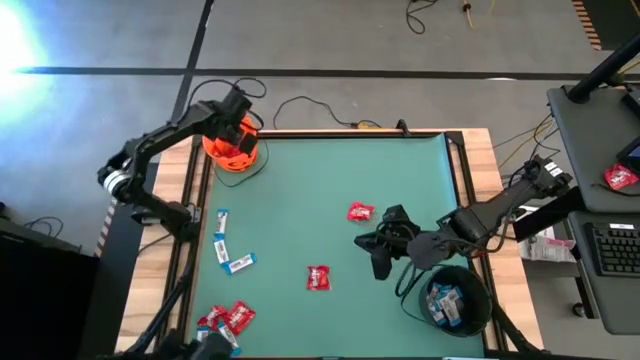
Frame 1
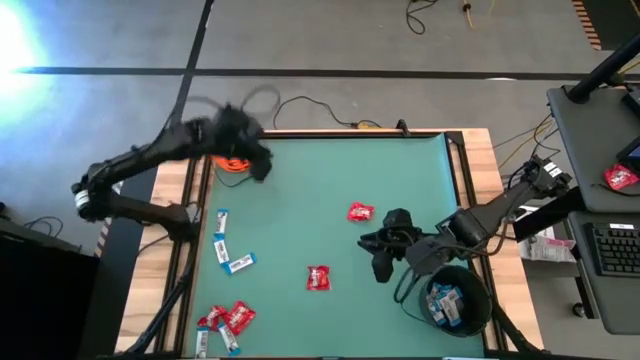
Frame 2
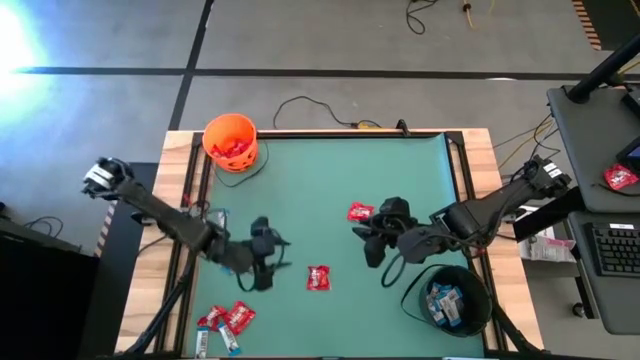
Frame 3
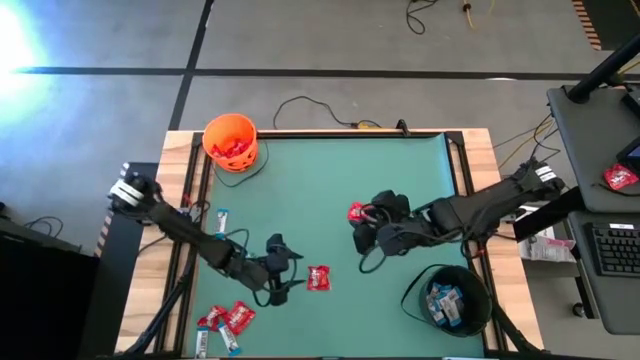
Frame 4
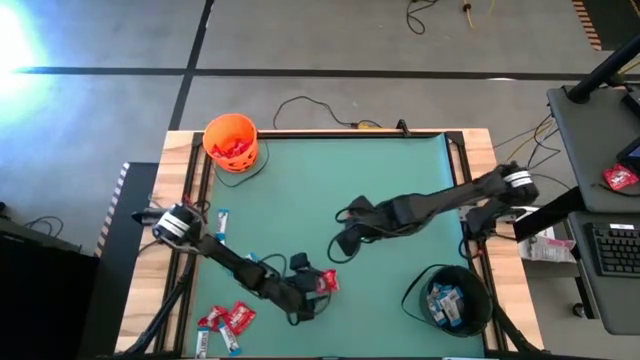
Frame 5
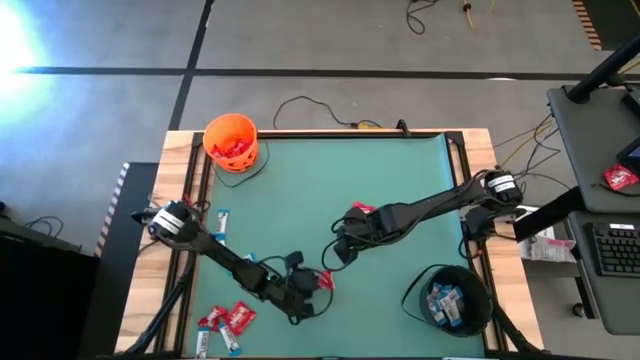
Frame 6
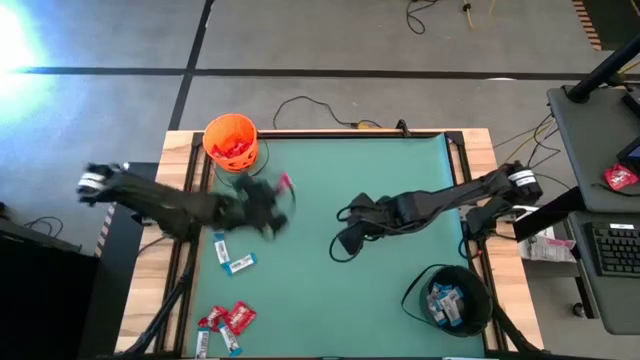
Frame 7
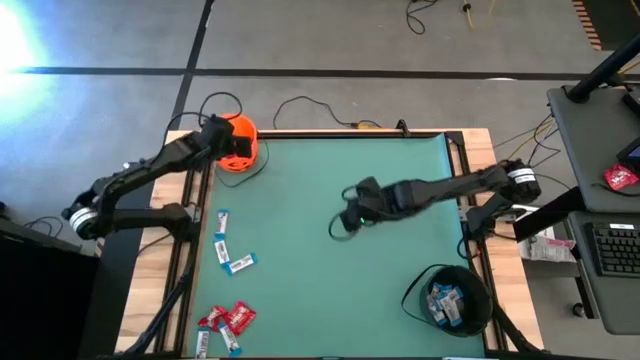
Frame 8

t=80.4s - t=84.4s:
Task: Sort candy by brand, put in halloween buckets
Put the red candy into the orange bucket

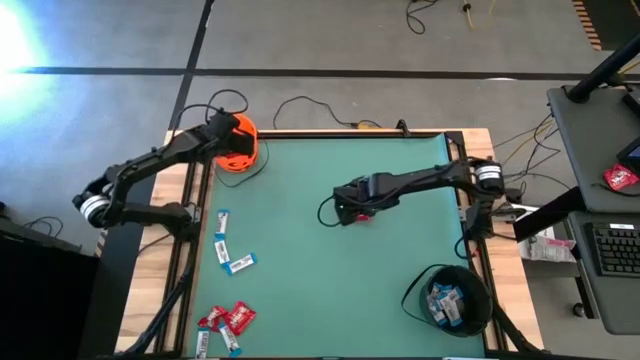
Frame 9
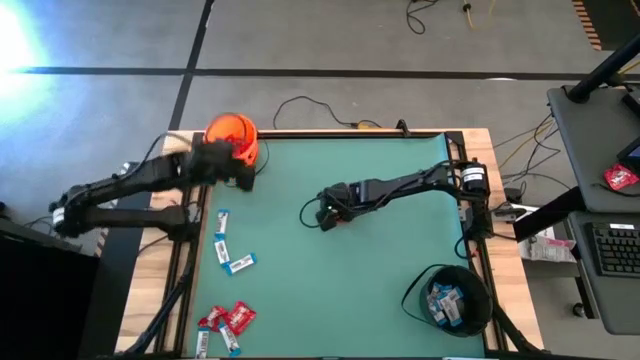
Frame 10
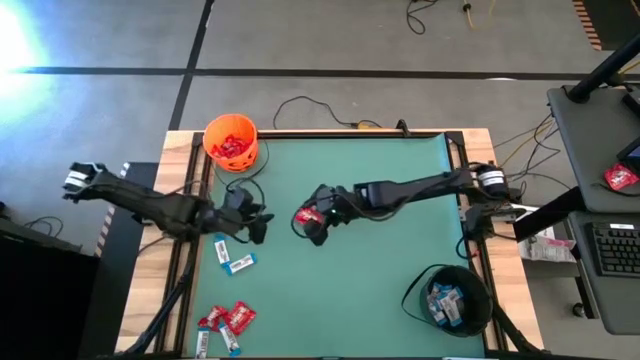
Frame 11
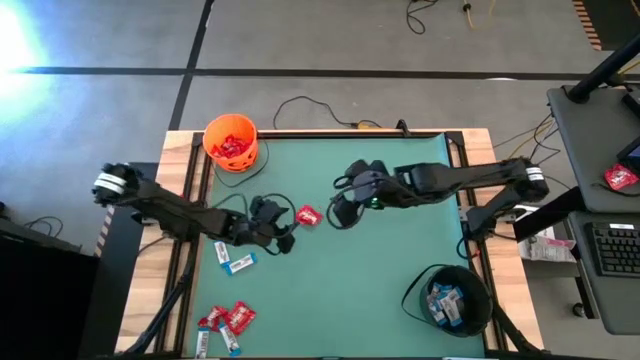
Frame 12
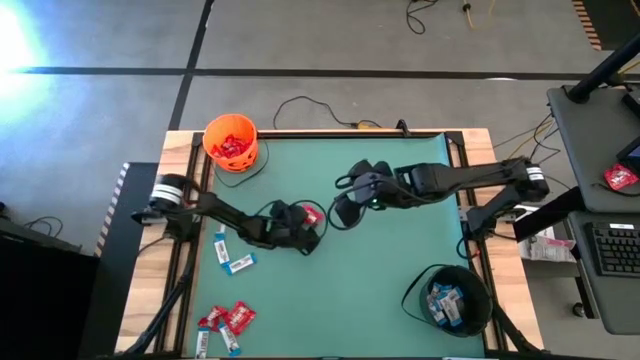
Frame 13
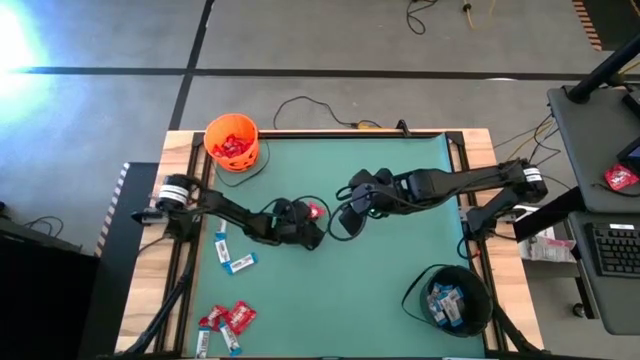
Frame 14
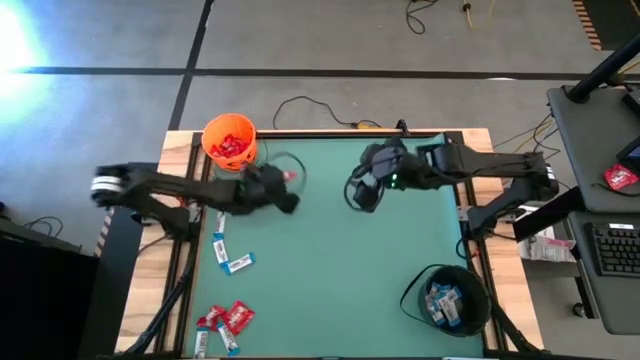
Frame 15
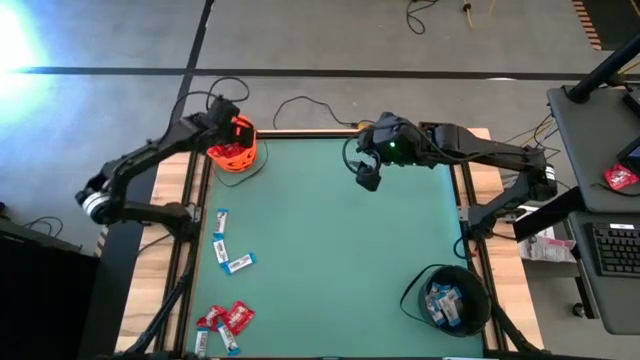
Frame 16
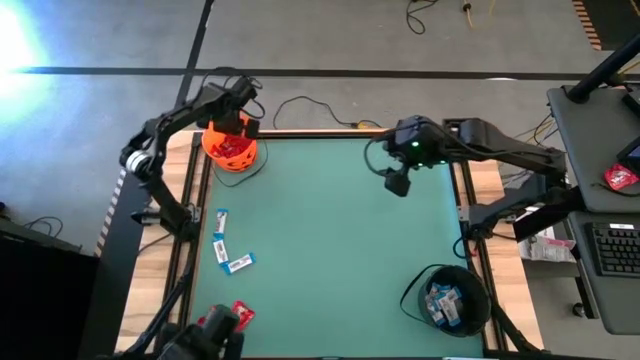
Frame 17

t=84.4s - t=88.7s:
Put the red candy into the orange bucket

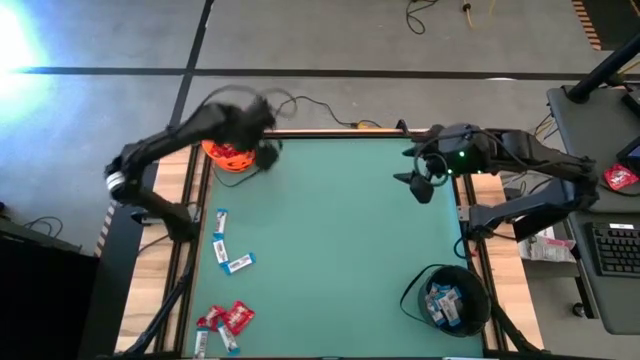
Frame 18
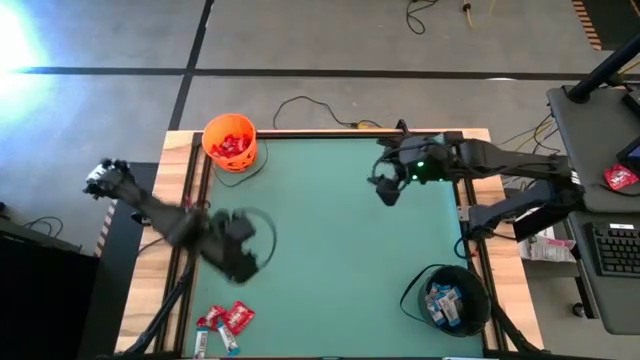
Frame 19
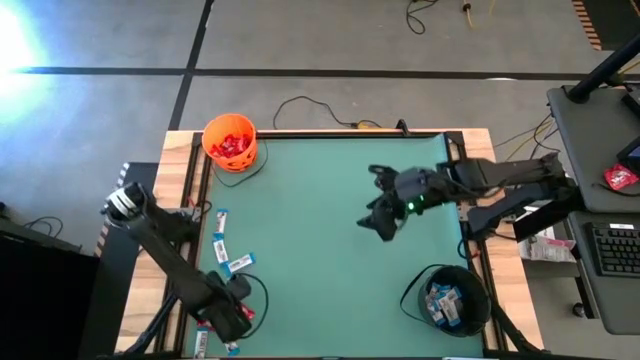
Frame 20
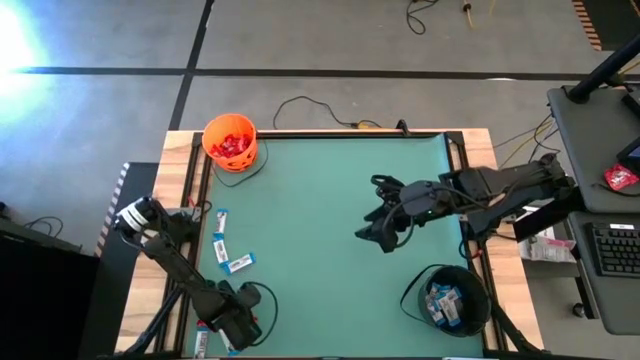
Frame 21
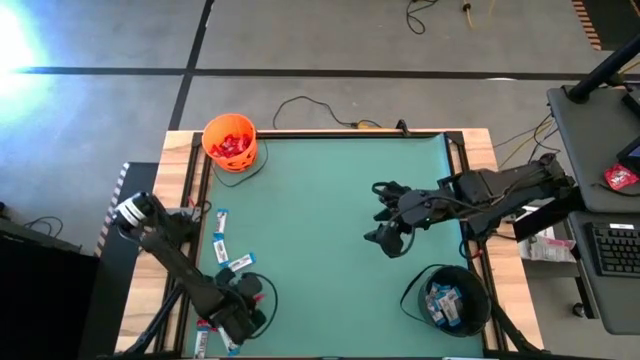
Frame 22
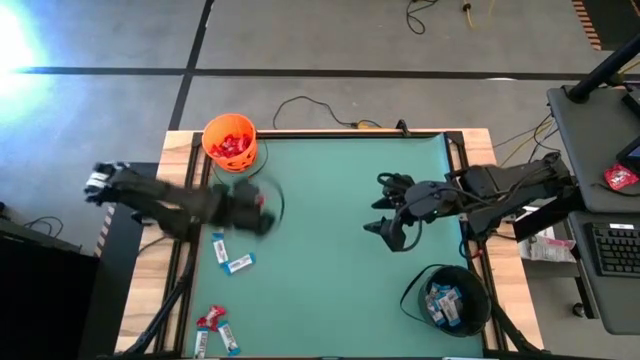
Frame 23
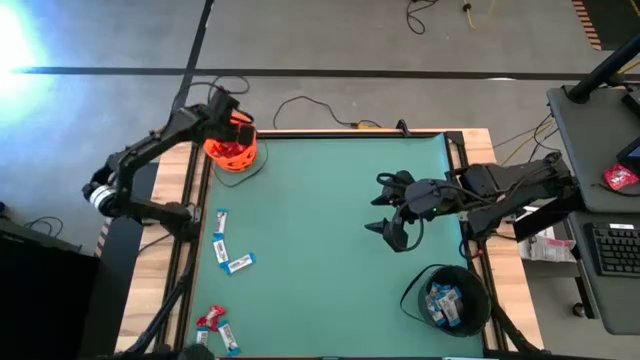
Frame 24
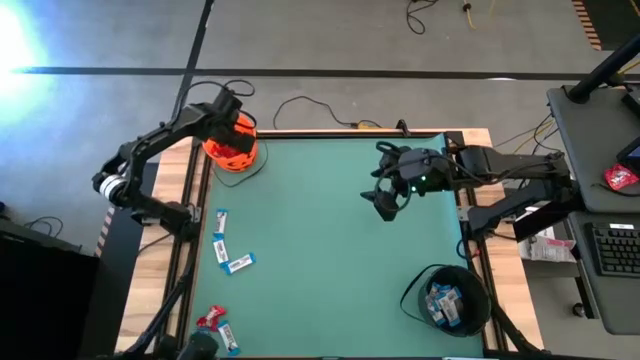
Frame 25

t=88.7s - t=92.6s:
Put the red candy into the orange bucket

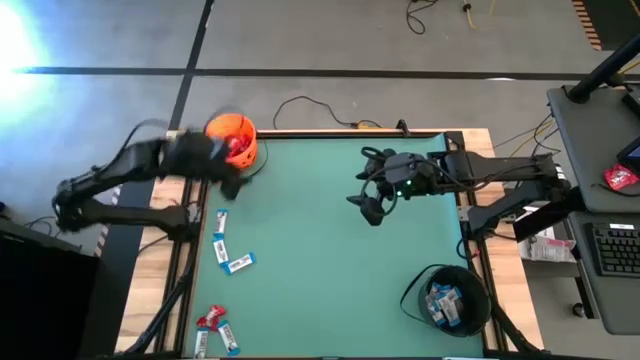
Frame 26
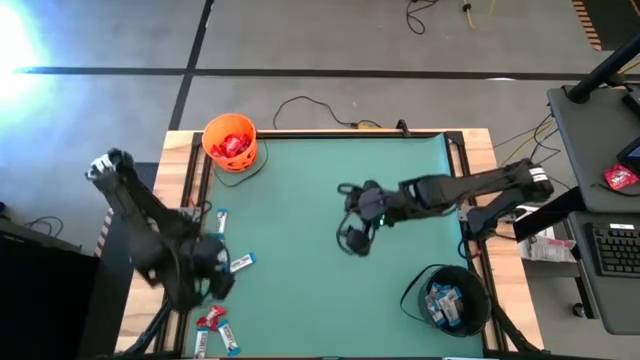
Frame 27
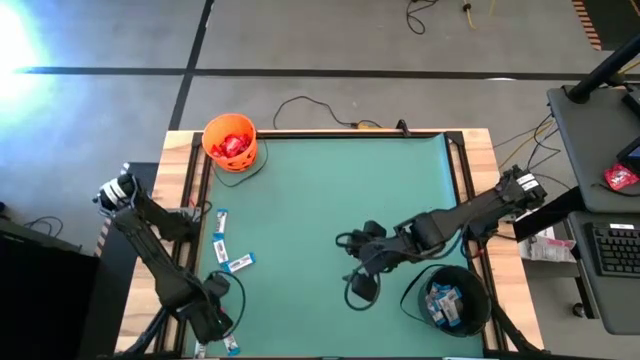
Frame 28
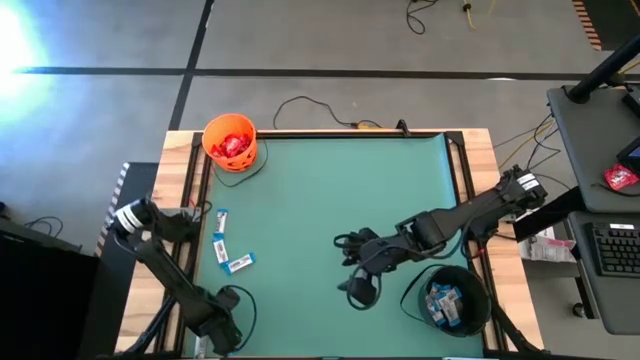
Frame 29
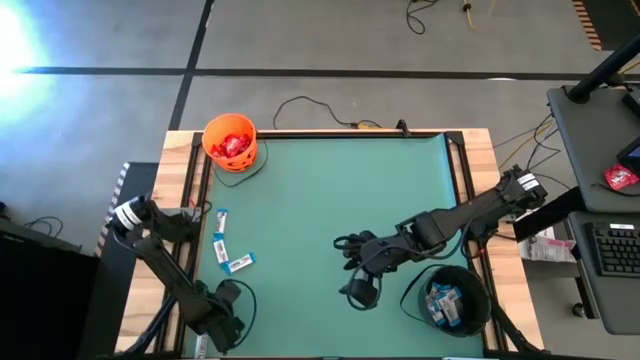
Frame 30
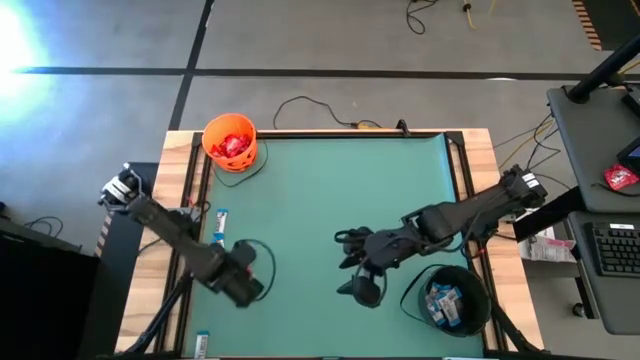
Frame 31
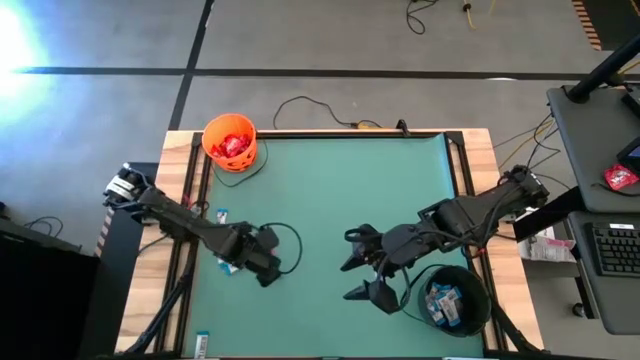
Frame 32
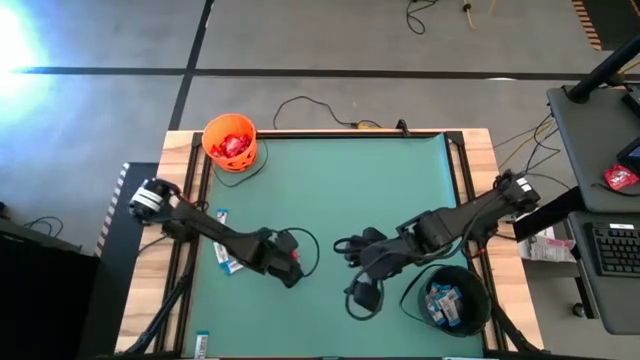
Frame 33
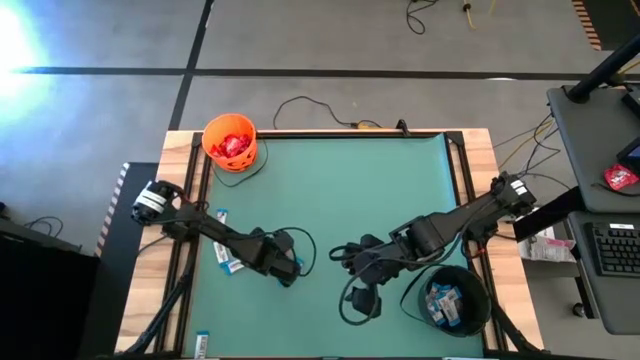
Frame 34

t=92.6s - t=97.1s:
Put the red candy into the orange bucket

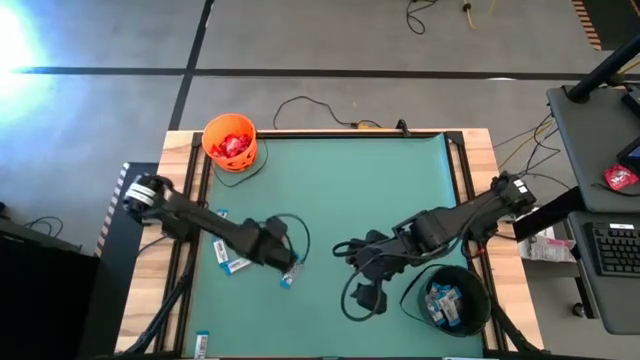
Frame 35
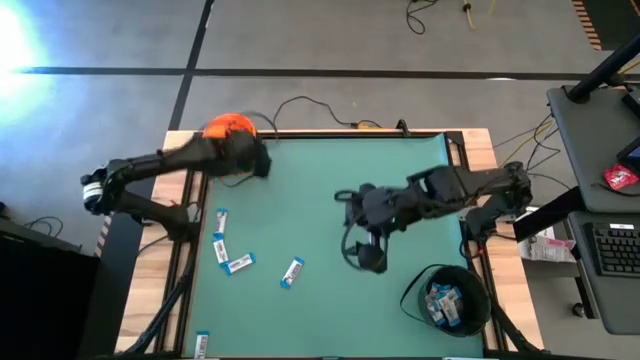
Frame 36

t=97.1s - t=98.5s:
Put the red candy into the orange bucket

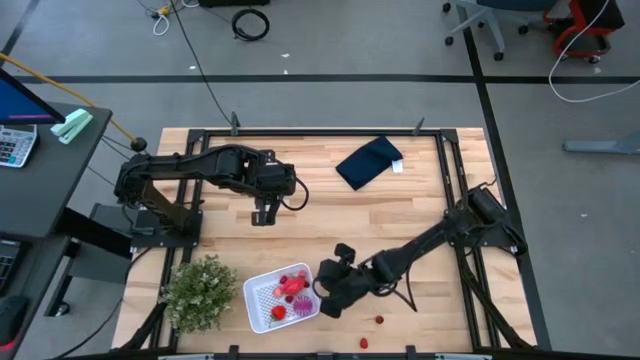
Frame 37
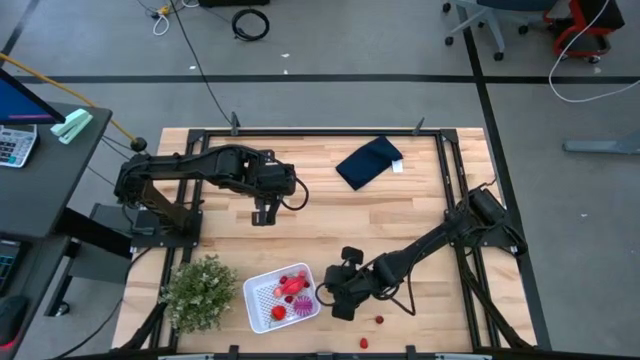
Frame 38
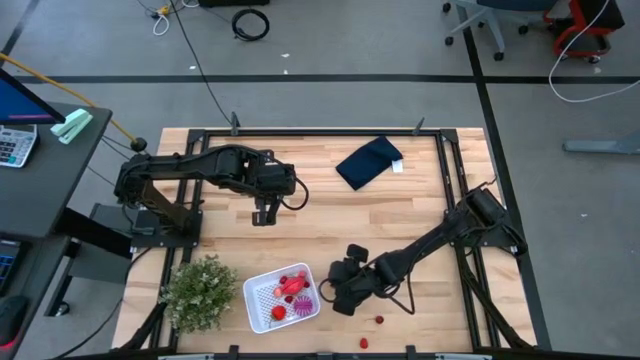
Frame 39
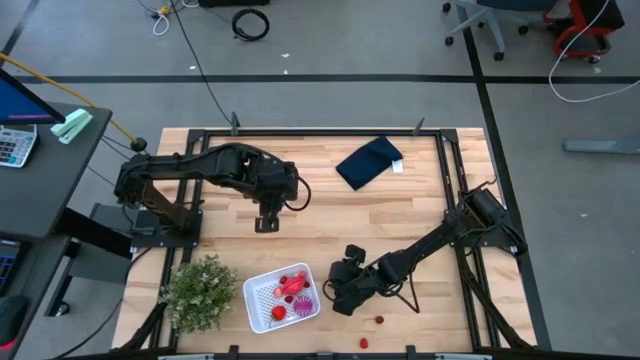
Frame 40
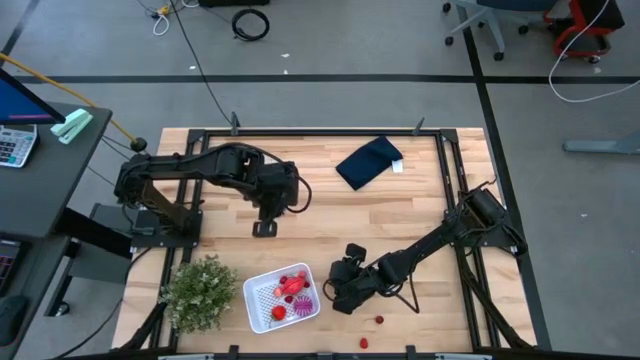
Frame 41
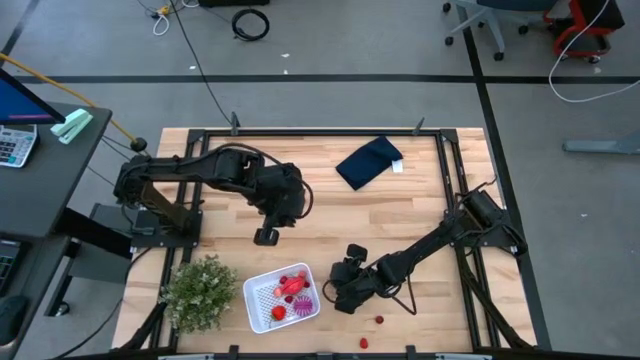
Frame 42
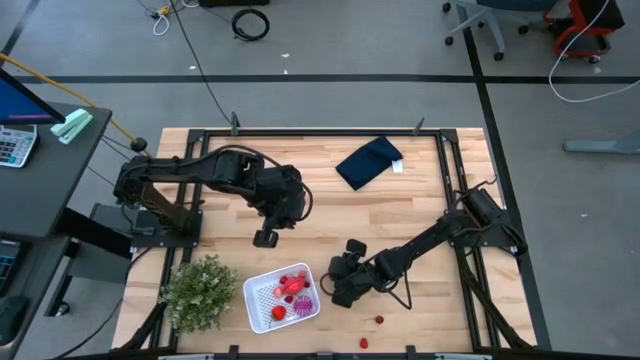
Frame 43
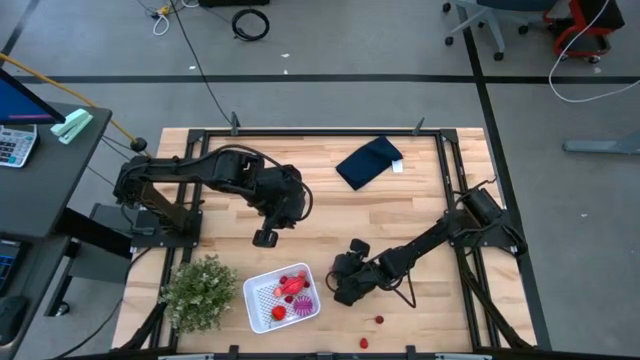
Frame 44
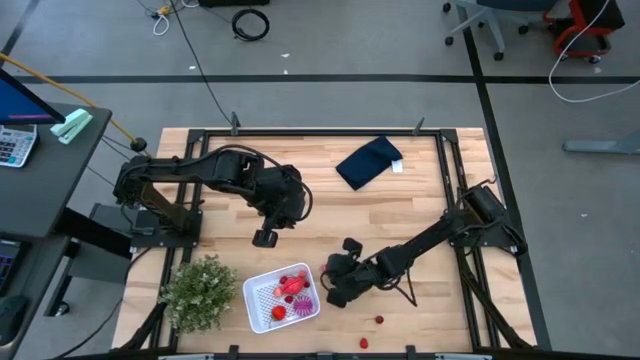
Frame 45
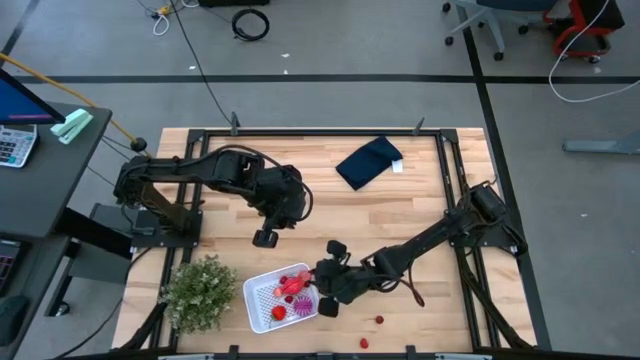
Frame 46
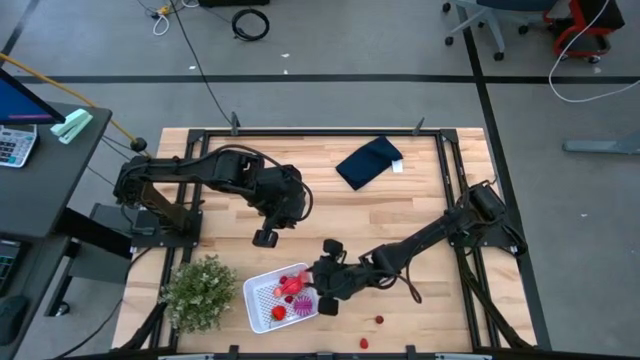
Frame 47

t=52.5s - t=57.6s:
Task: Pick and placing Produce into tupperware
Put the peach into the white bin
